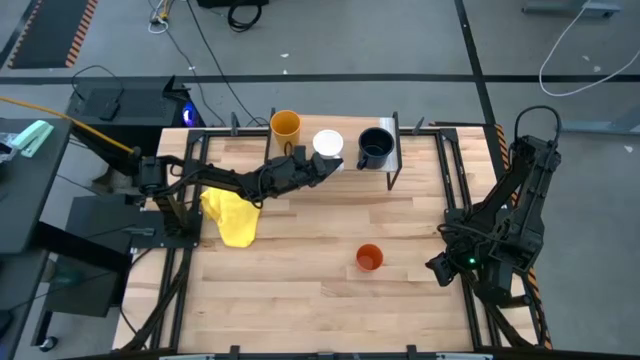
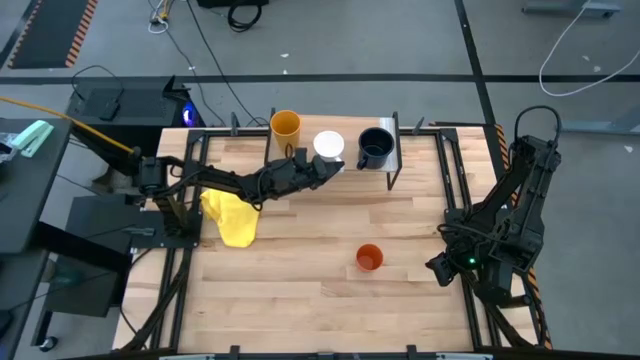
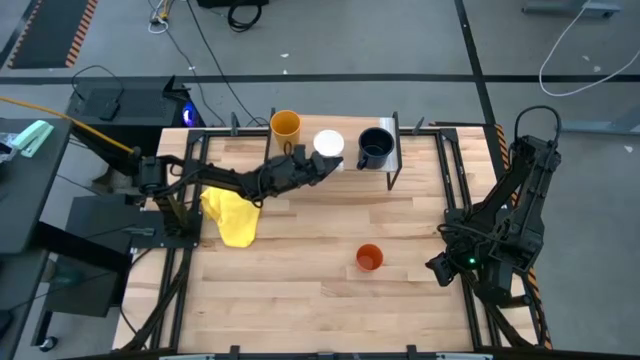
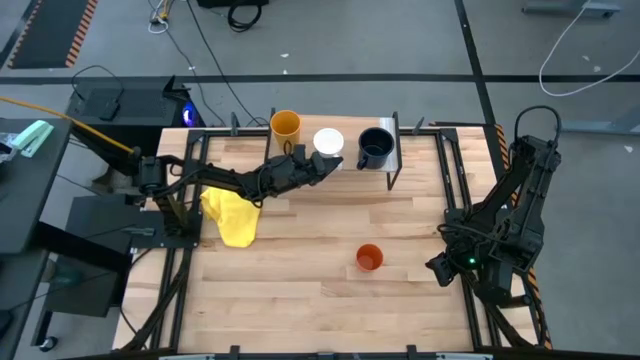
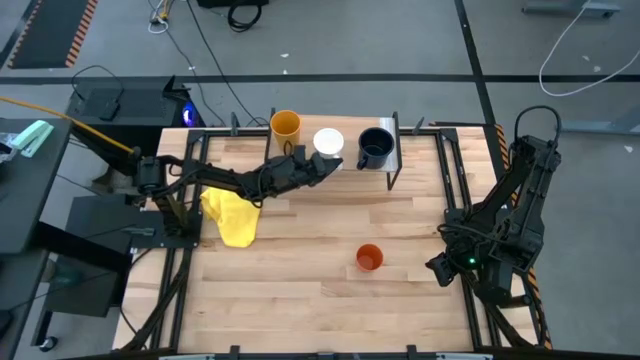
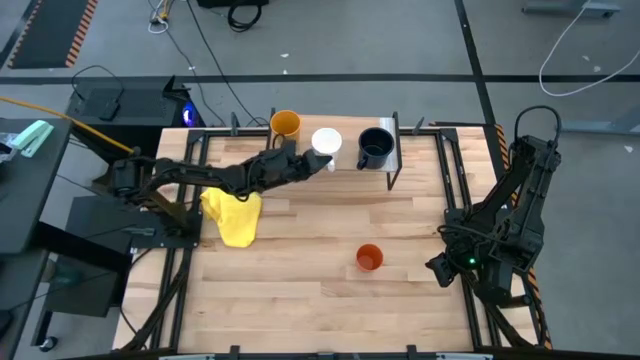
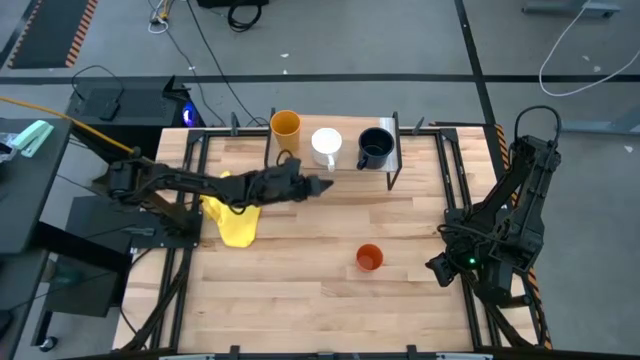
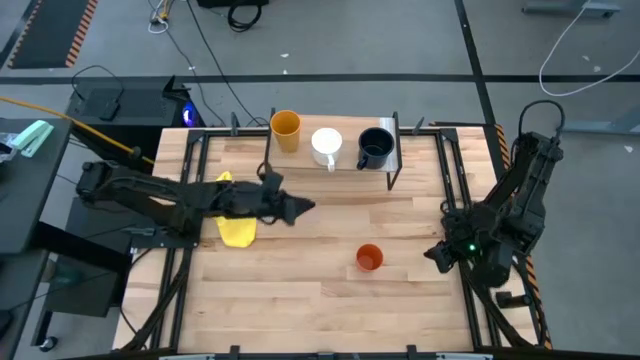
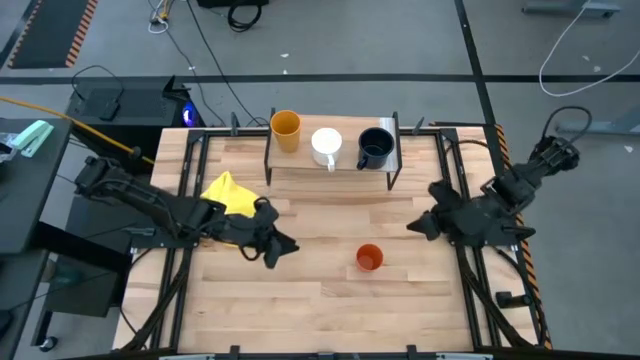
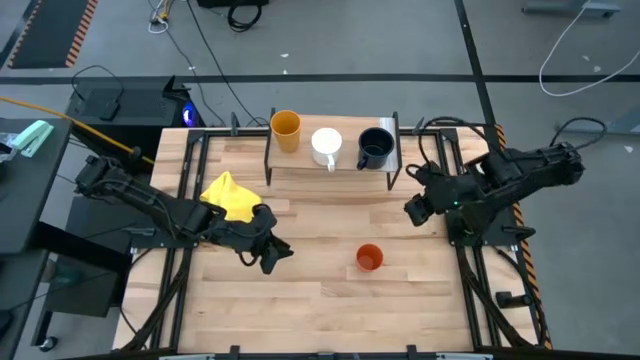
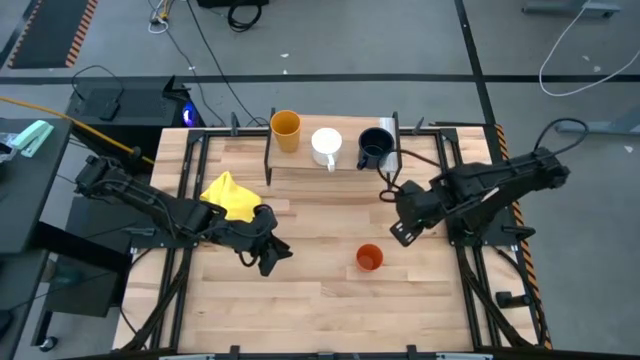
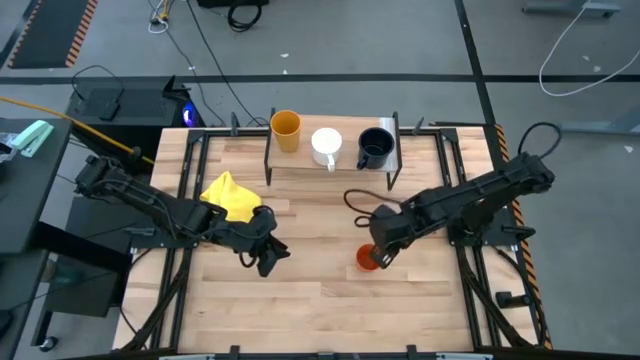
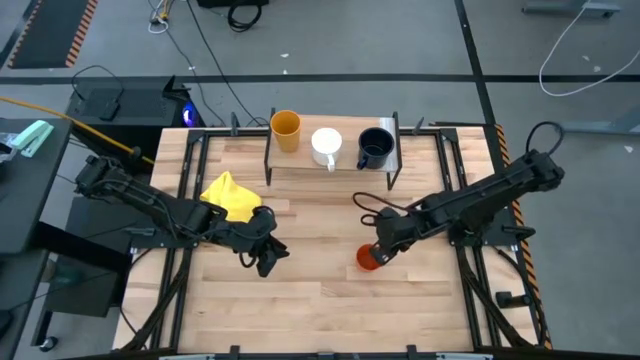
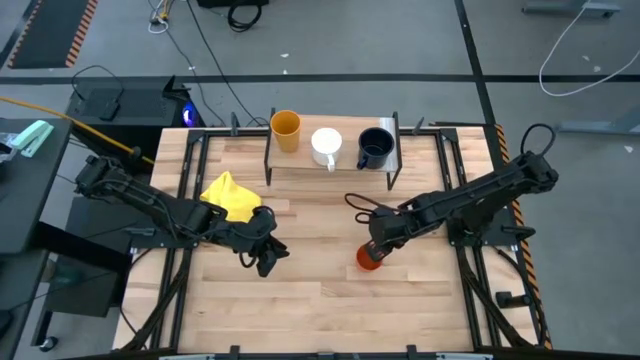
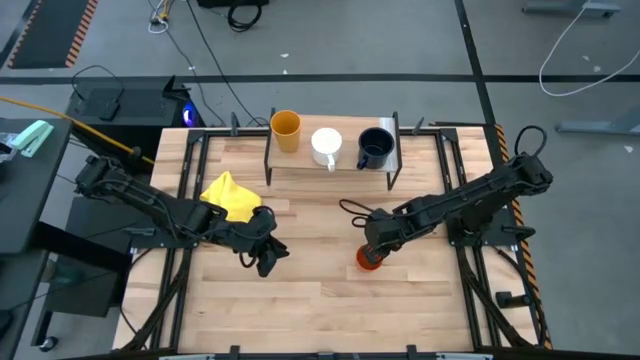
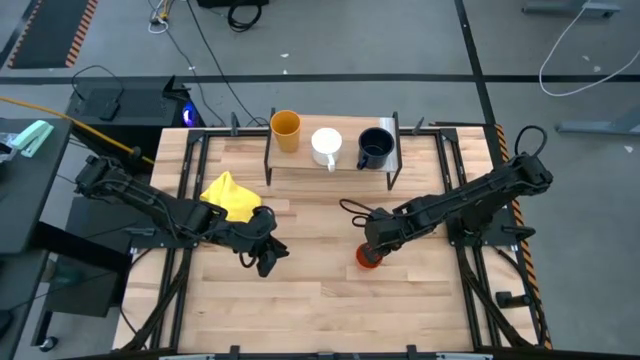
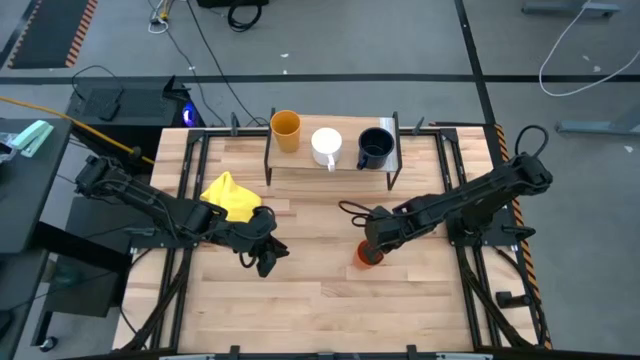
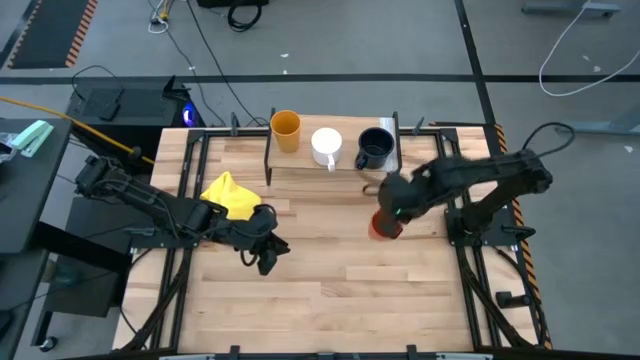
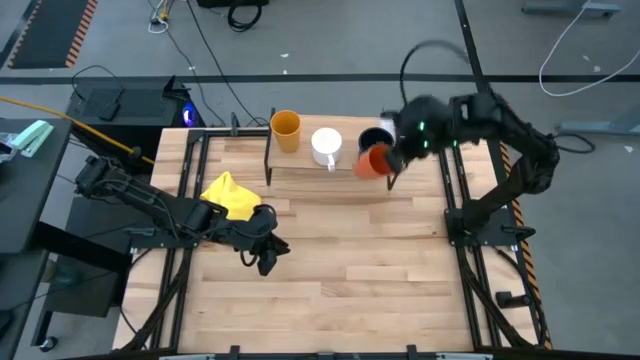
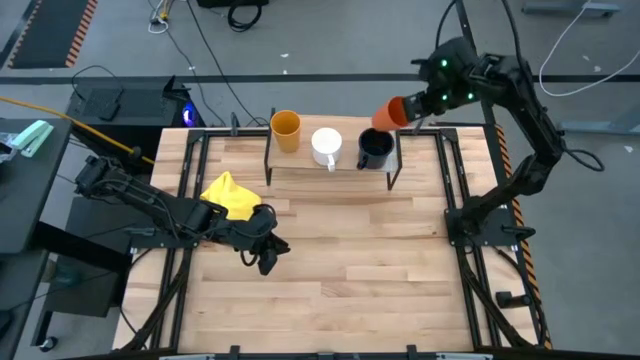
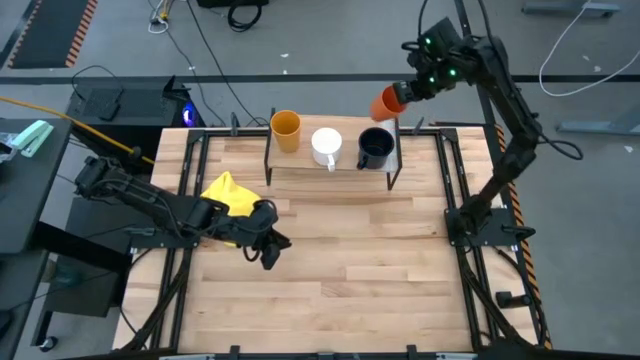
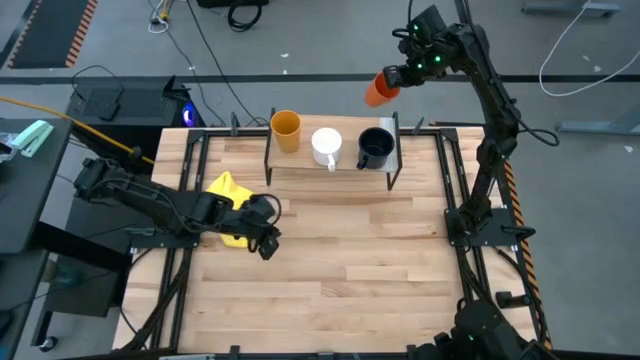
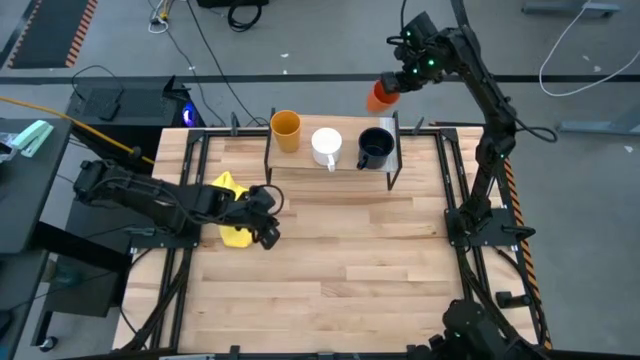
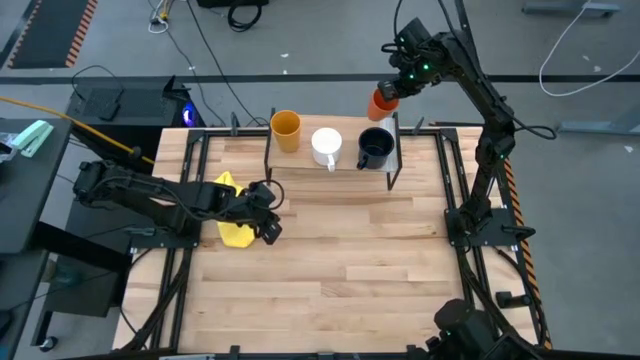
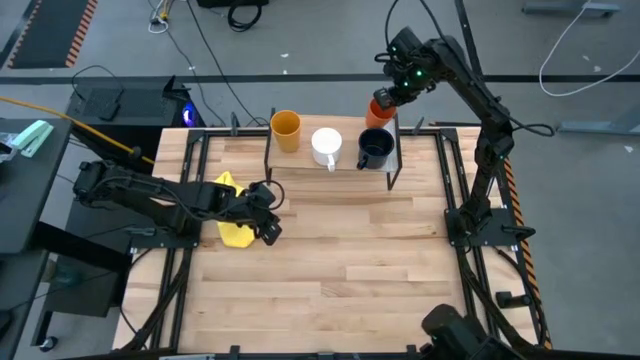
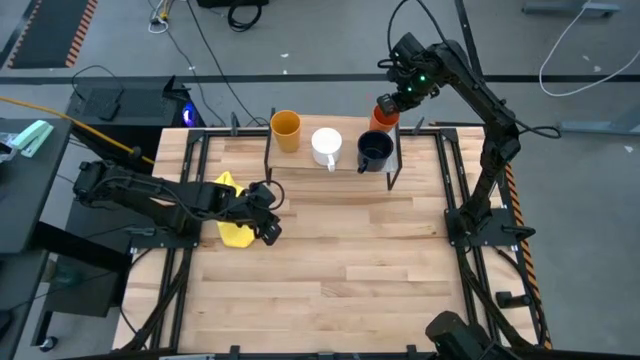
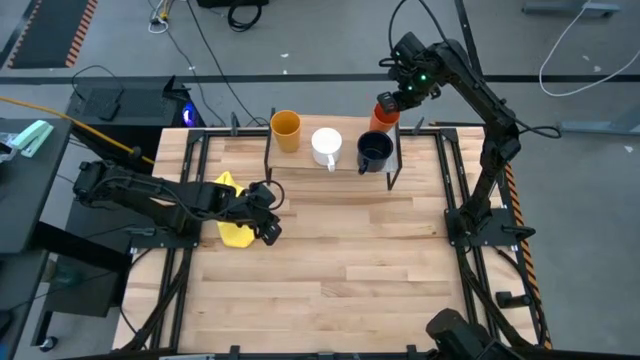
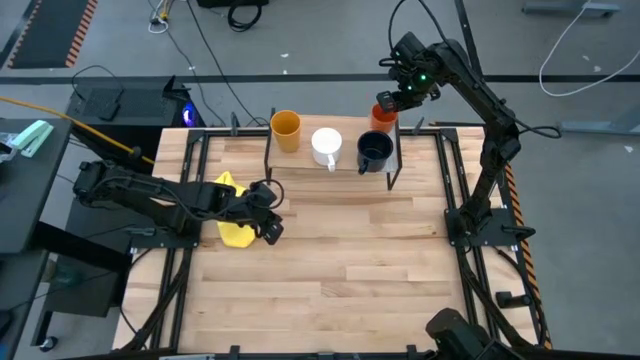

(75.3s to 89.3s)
Task: Stack small to large cups/mugs on shelf
Put the orange cup on the shelf

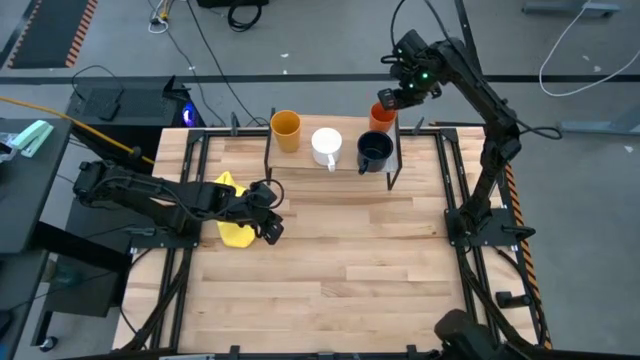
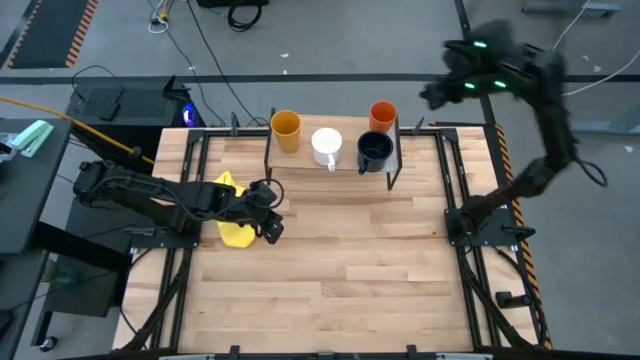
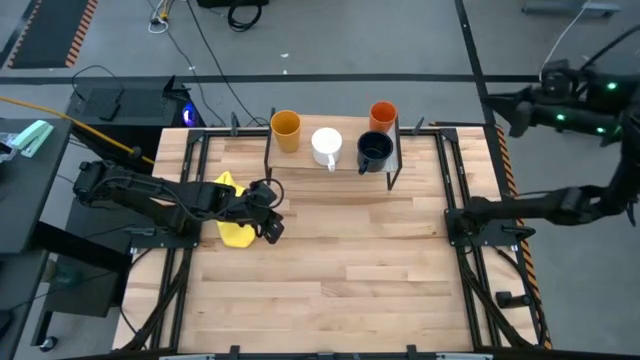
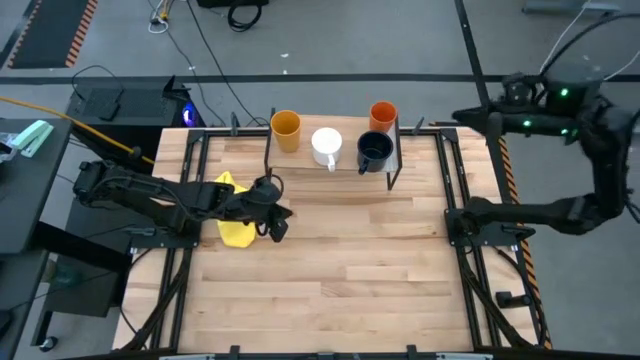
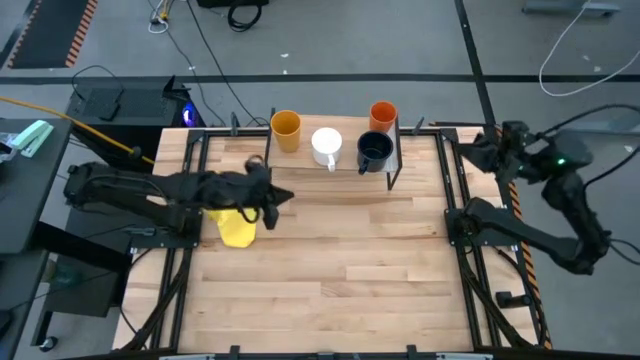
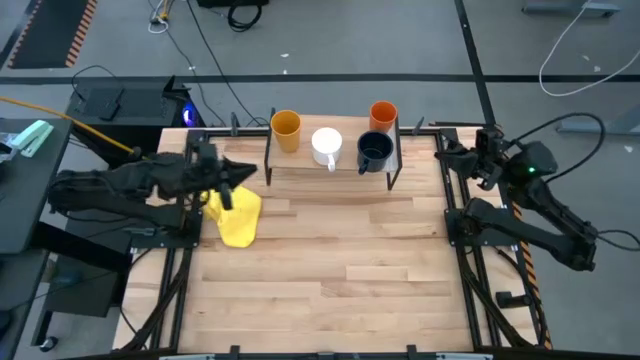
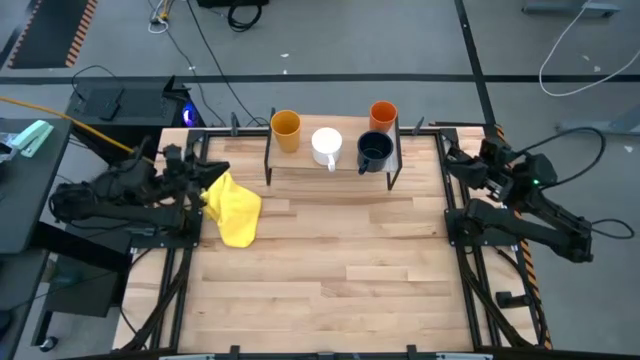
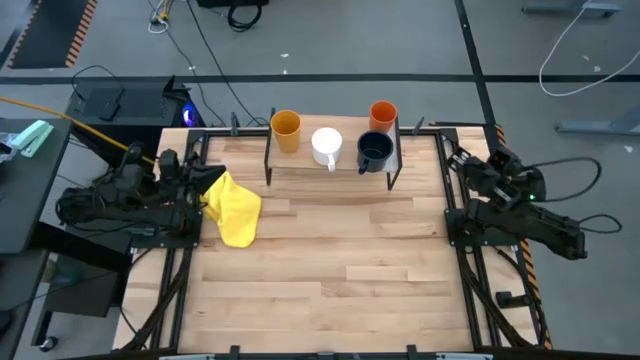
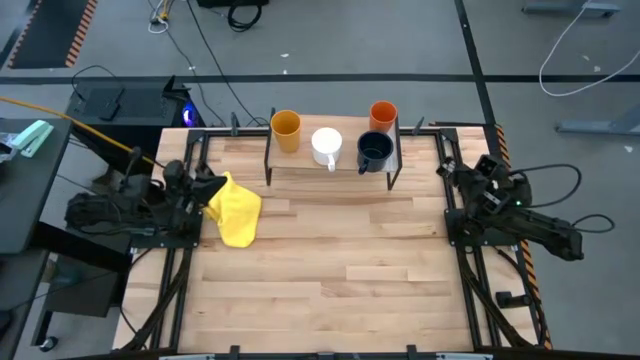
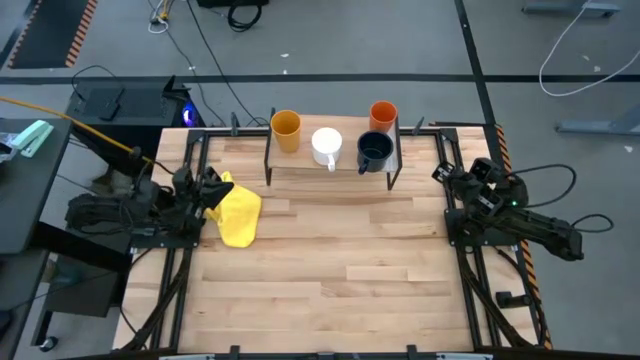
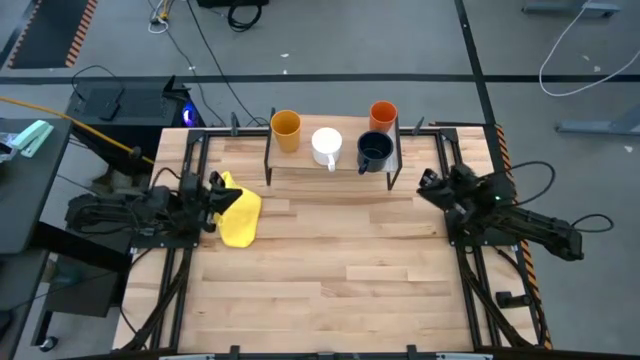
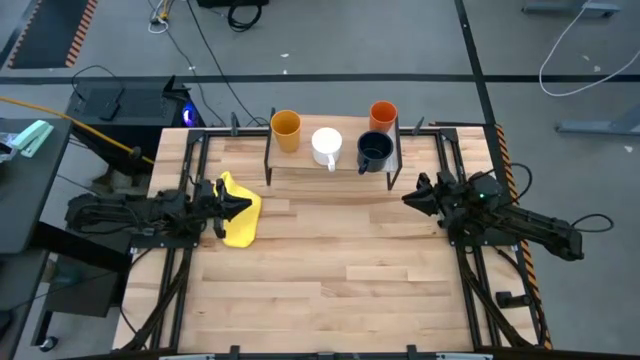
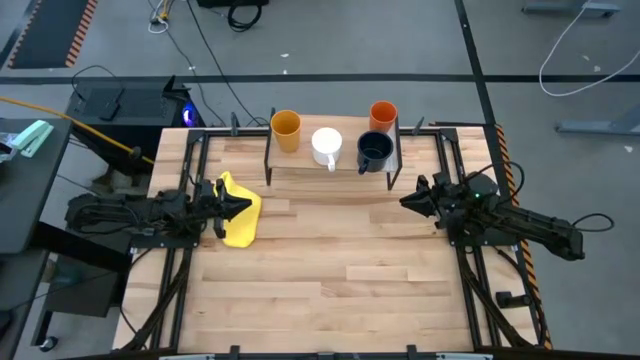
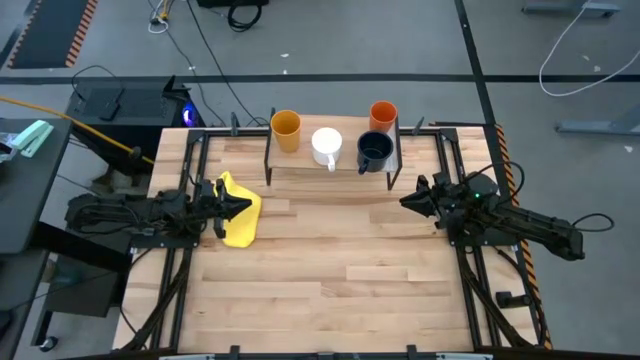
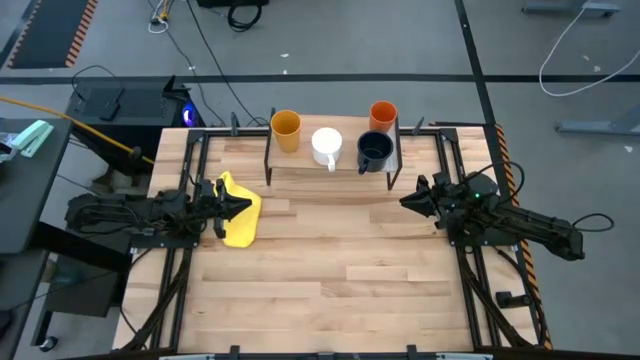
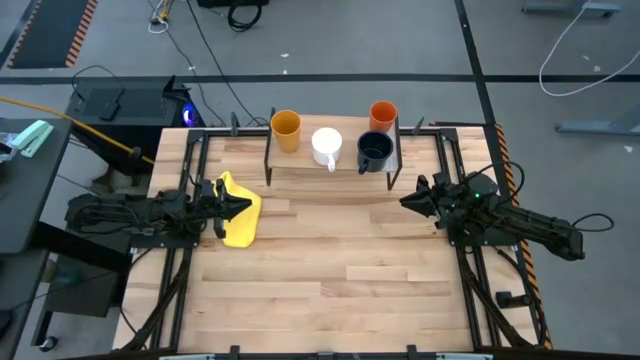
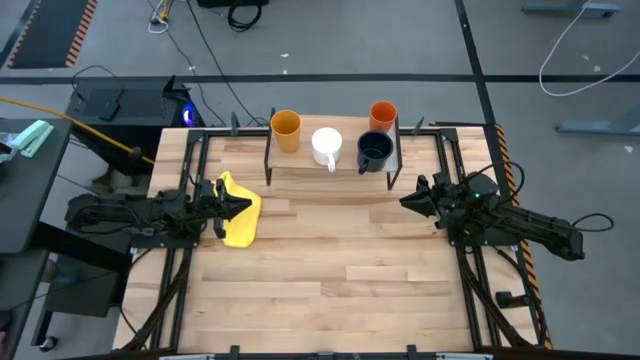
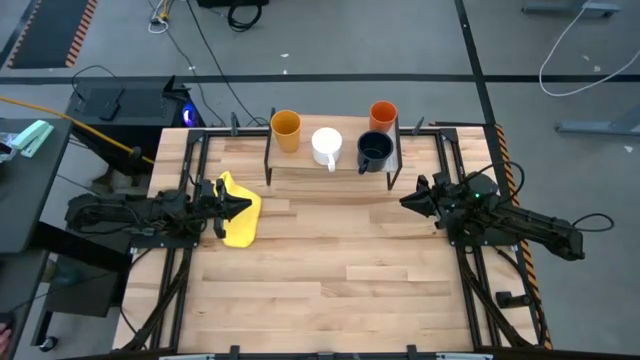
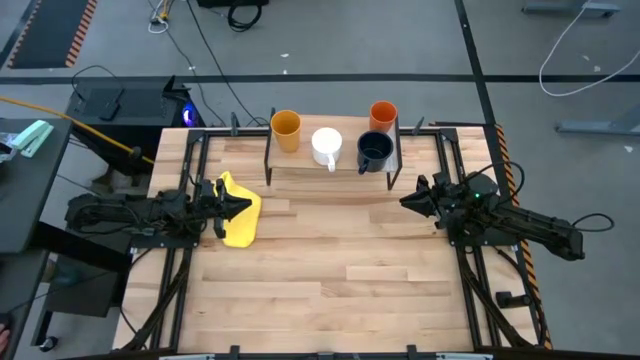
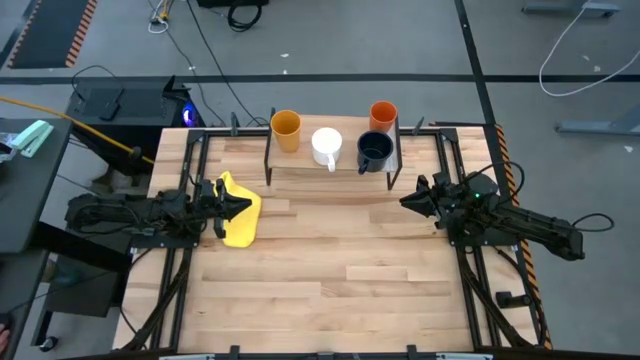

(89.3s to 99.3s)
Return to Home Position
